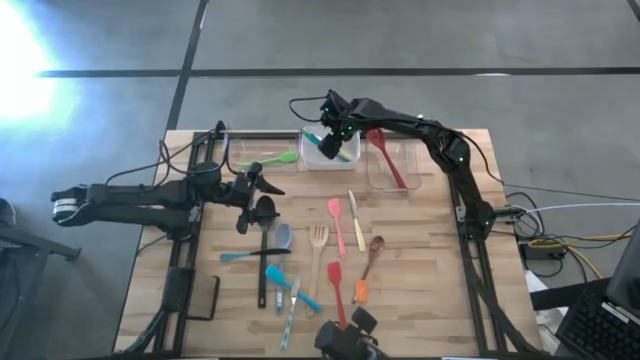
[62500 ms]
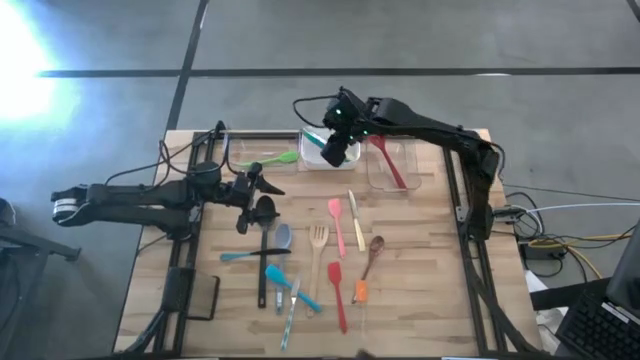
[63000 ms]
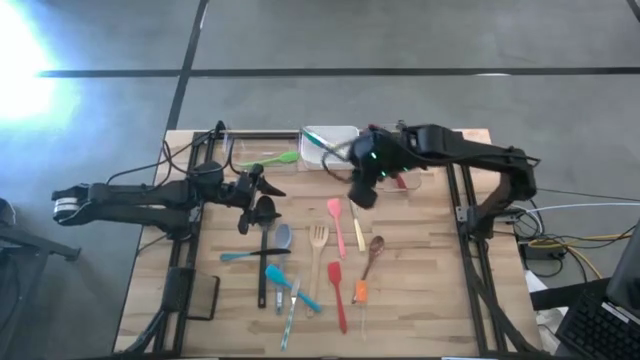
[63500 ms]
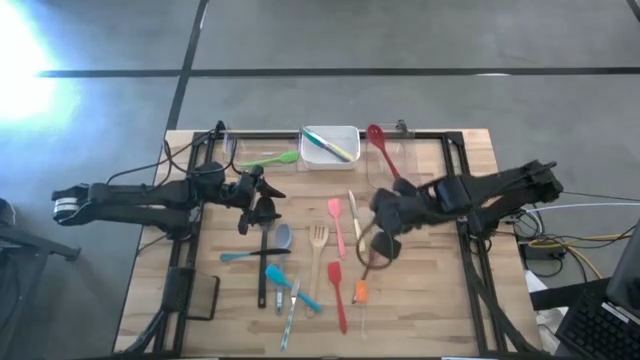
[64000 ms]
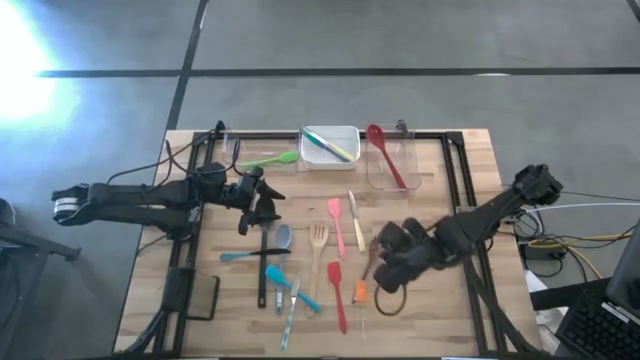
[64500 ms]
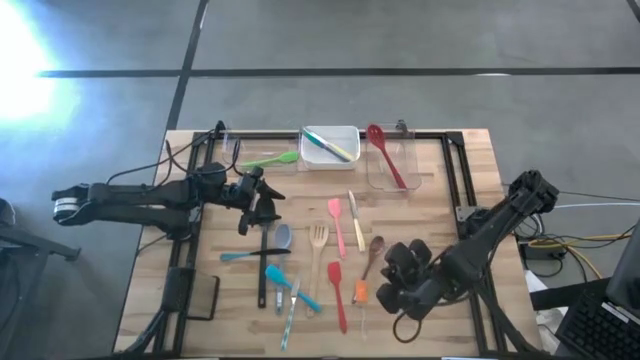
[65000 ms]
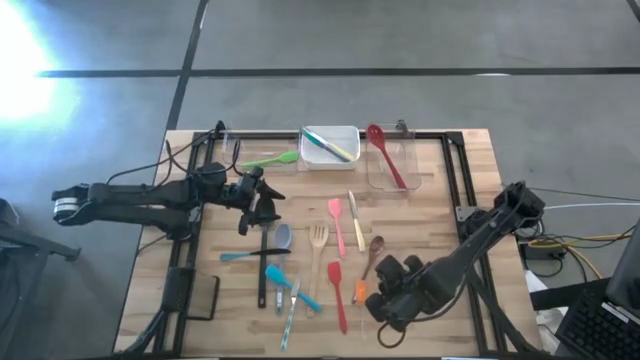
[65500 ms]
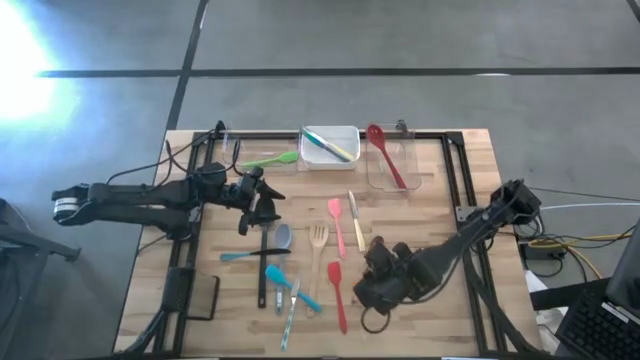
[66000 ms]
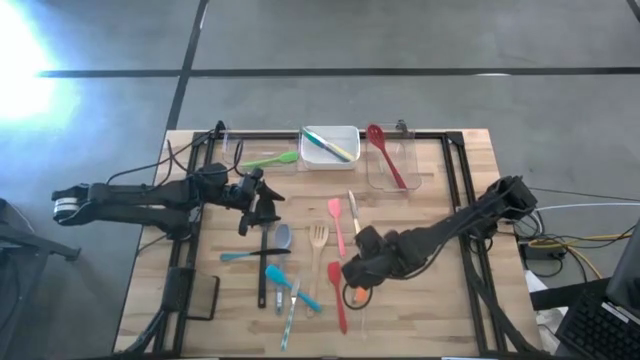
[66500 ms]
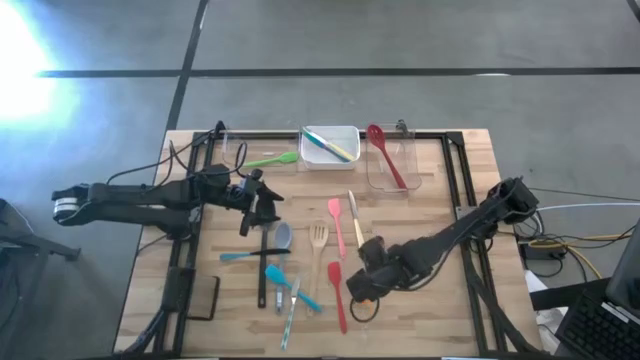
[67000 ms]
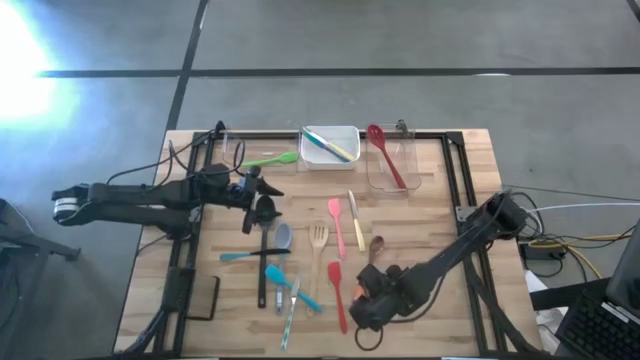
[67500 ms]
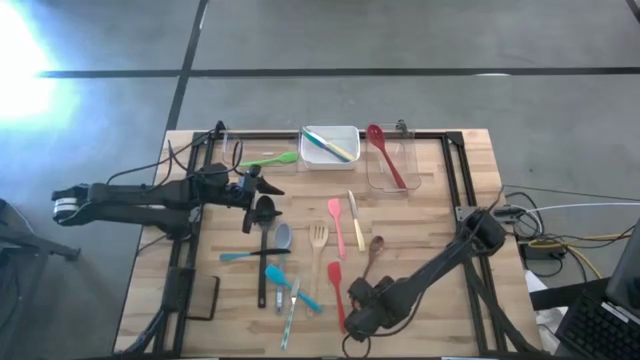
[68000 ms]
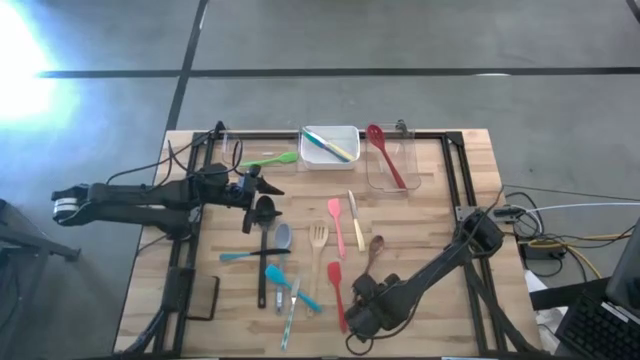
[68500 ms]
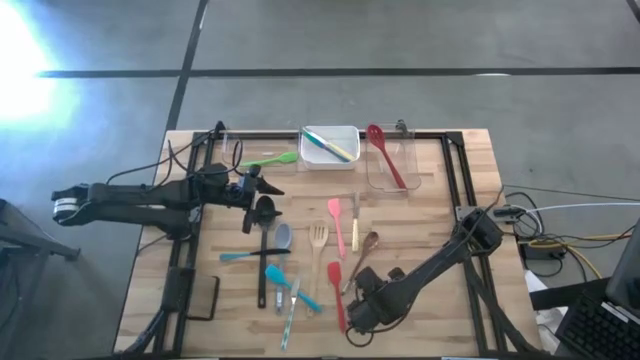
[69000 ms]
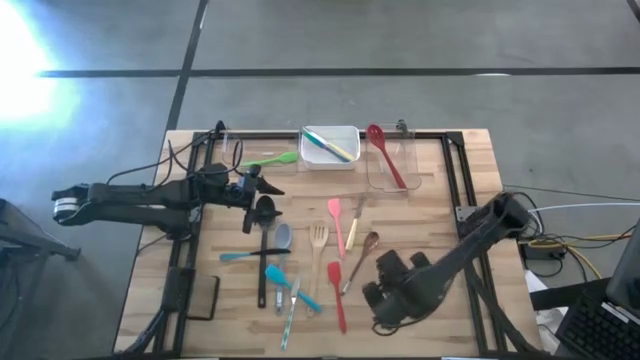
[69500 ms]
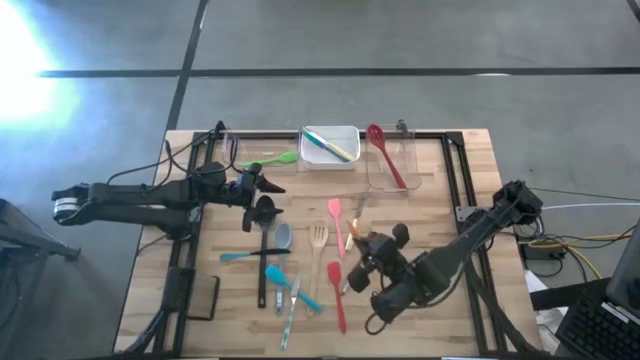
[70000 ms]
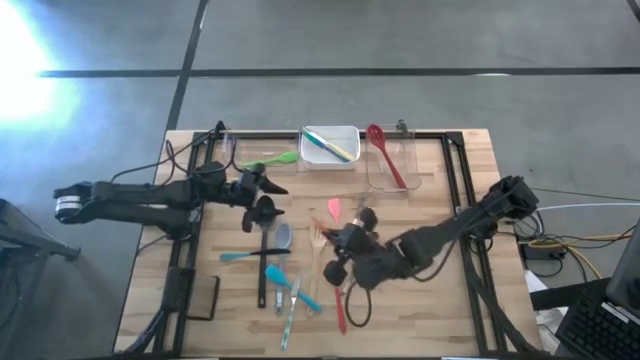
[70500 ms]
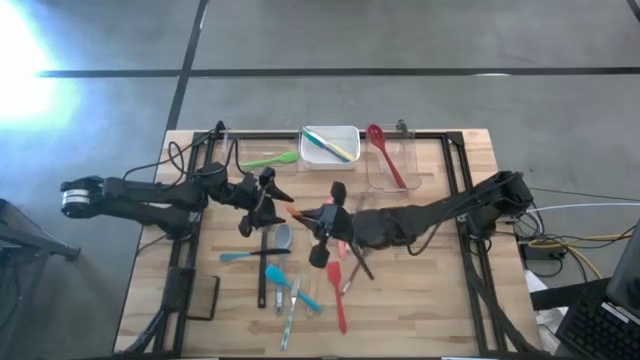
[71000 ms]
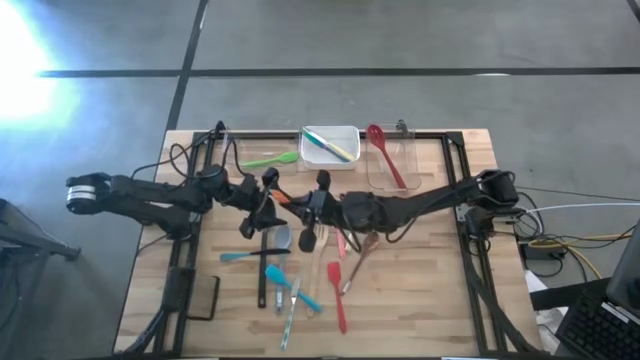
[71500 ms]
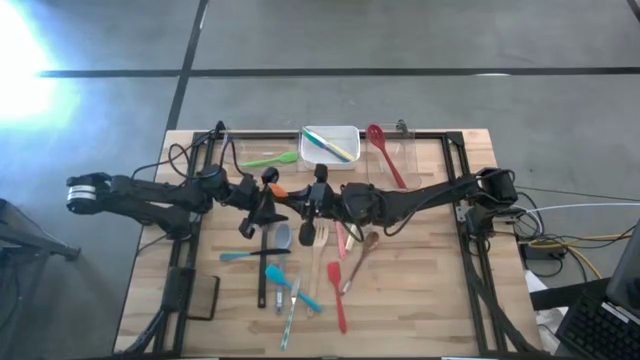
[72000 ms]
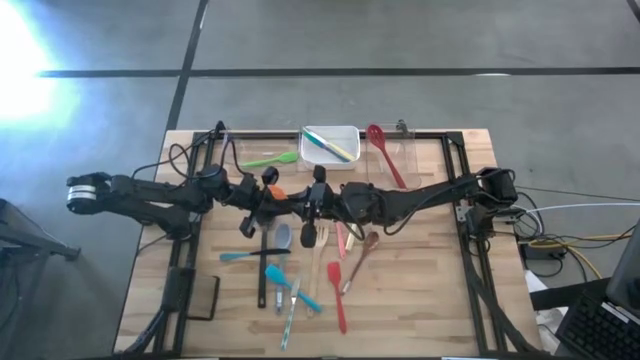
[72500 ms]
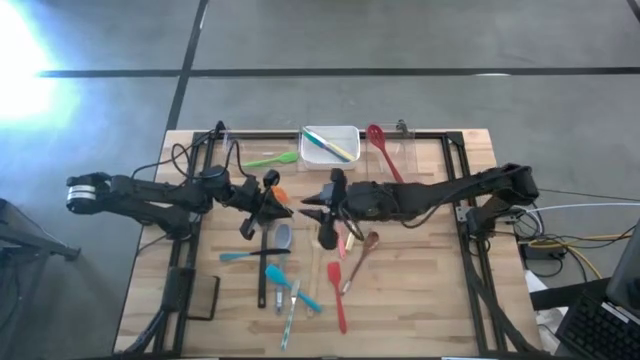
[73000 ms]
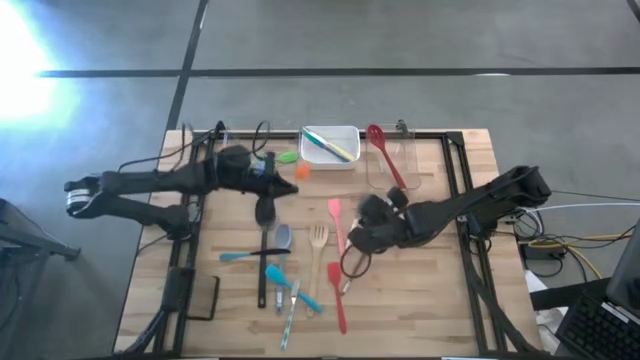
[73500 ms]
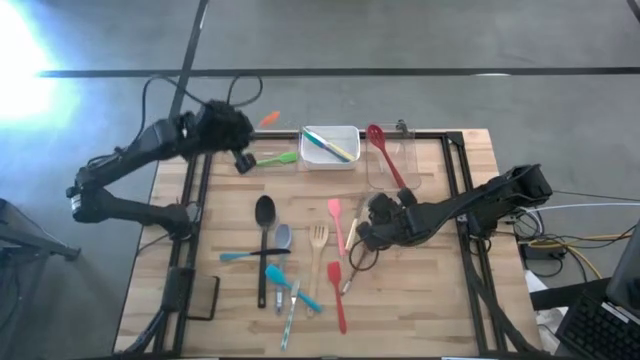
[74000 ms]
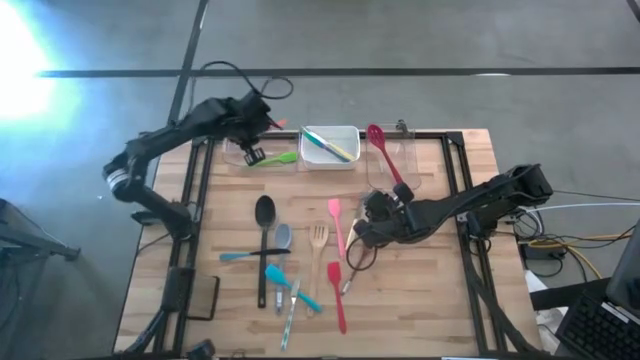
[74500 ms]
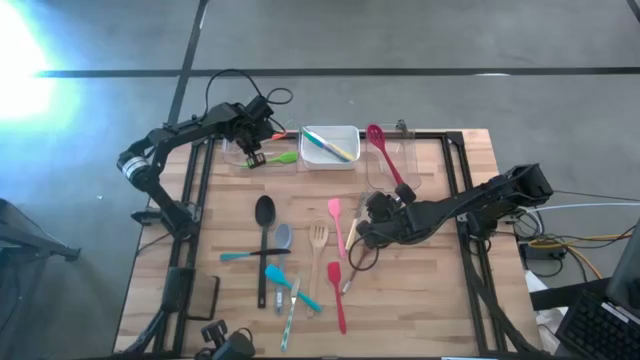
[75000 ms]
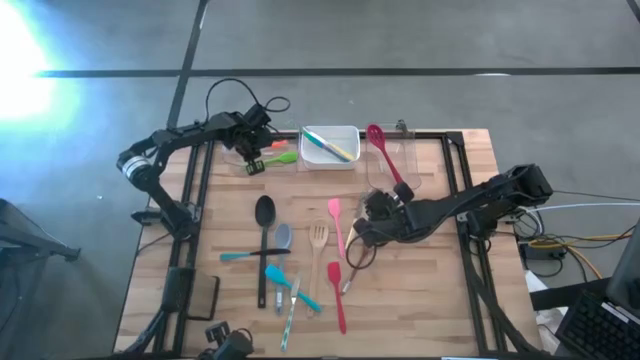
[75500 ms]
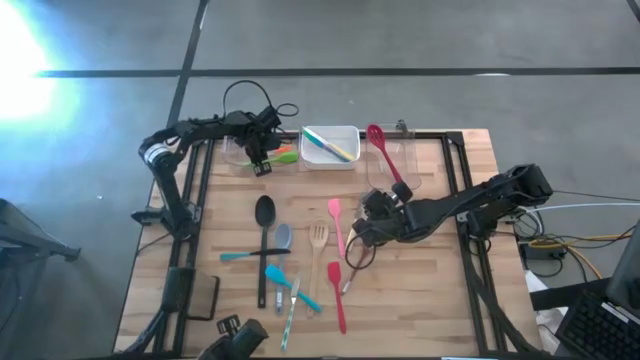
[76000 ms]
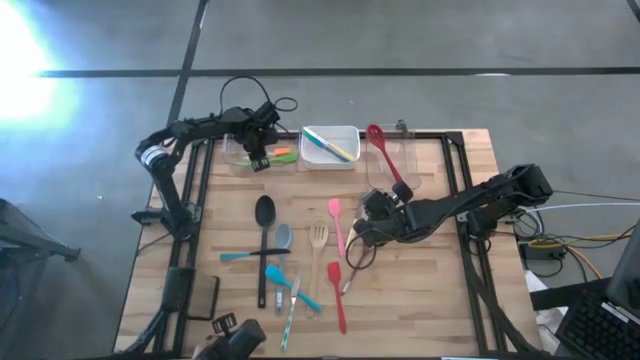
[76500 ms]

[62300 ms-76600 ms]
Task: Pick & Place Kitchen Items
Put the orange spatula into the left transparent bin

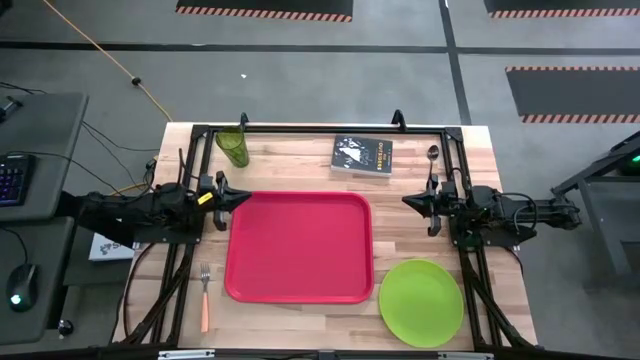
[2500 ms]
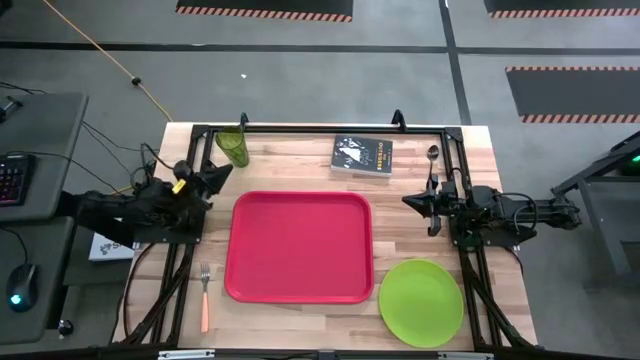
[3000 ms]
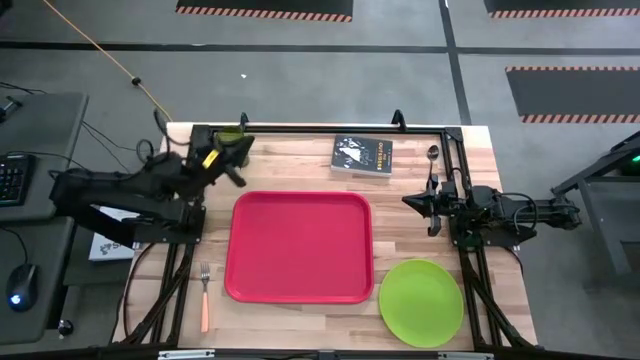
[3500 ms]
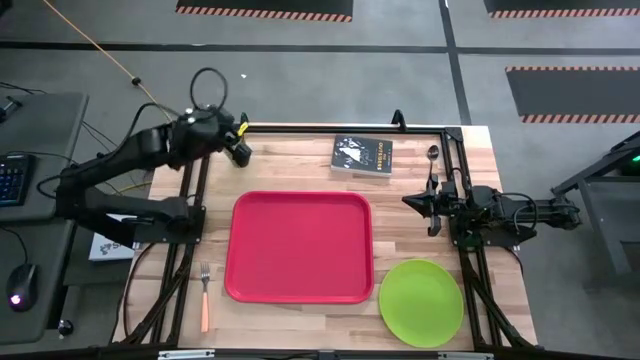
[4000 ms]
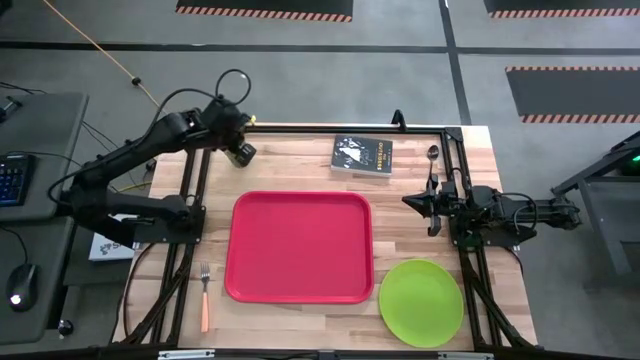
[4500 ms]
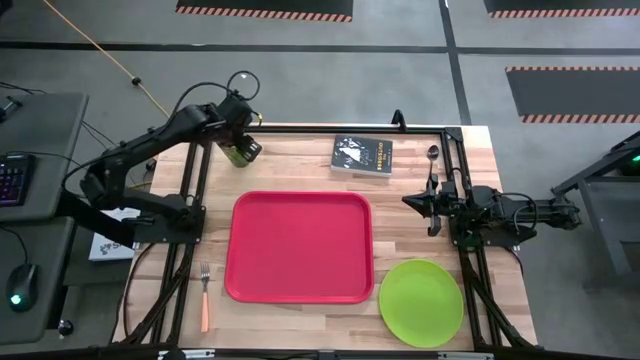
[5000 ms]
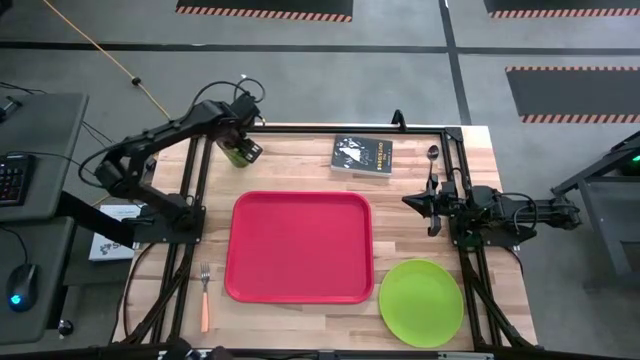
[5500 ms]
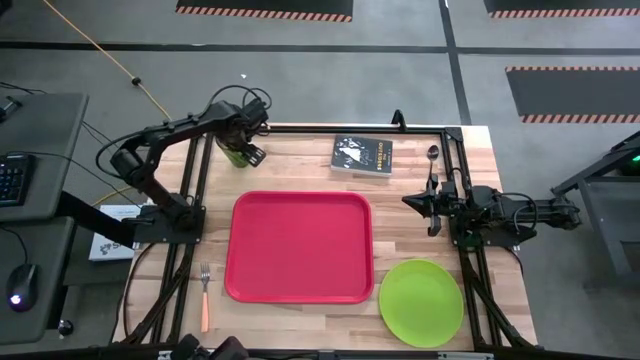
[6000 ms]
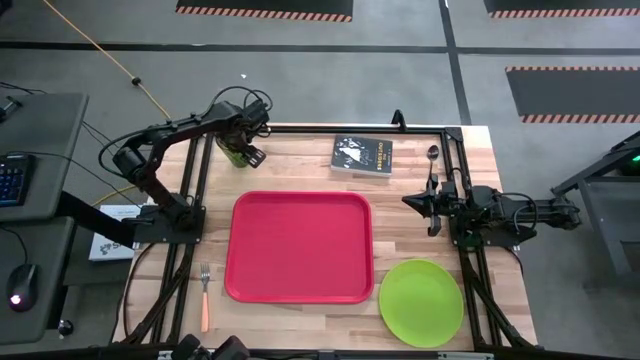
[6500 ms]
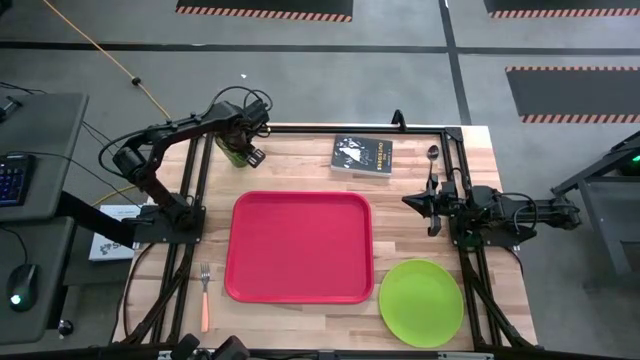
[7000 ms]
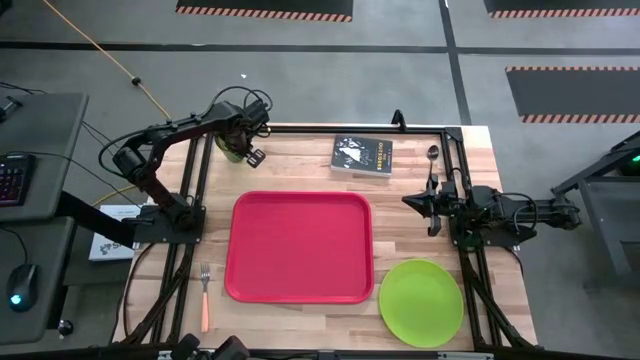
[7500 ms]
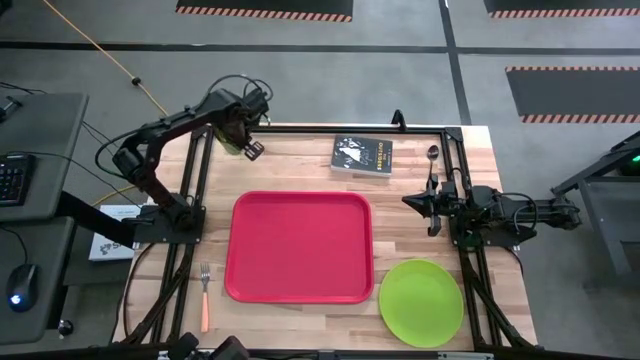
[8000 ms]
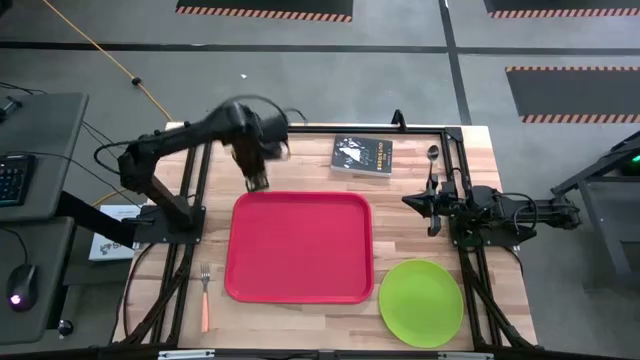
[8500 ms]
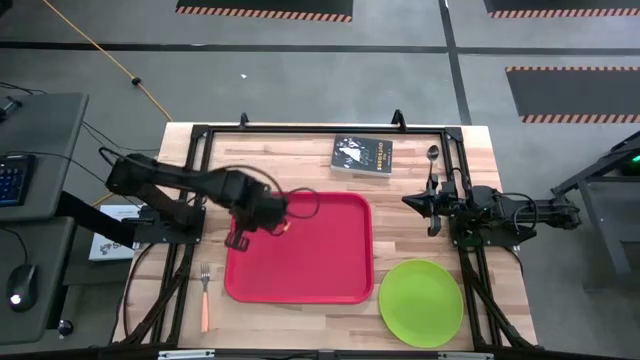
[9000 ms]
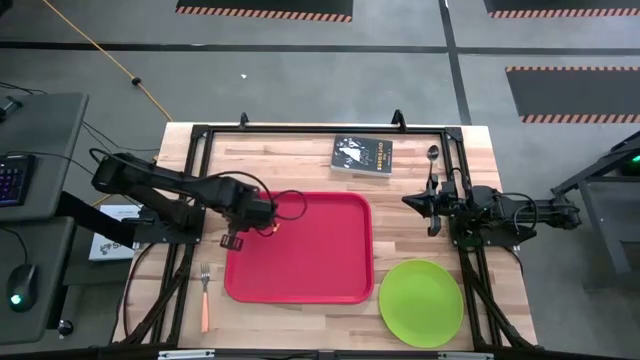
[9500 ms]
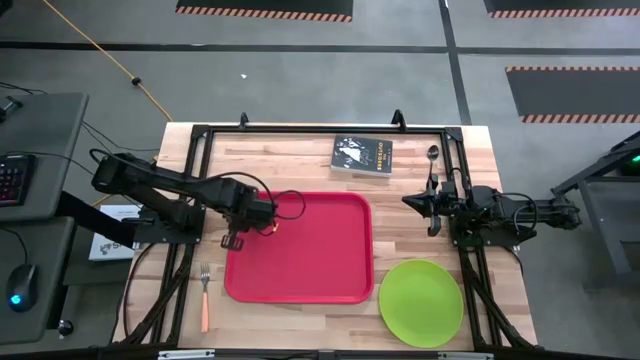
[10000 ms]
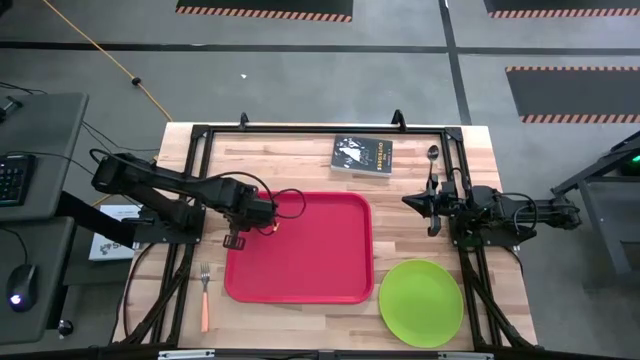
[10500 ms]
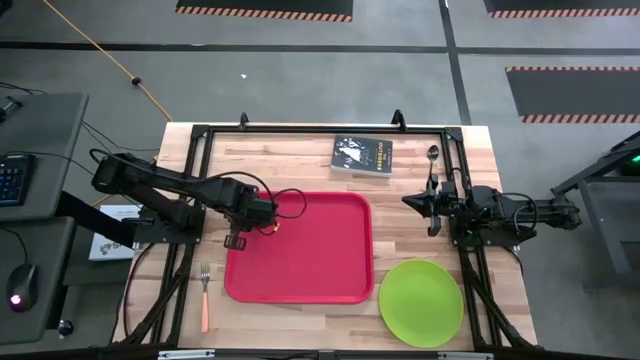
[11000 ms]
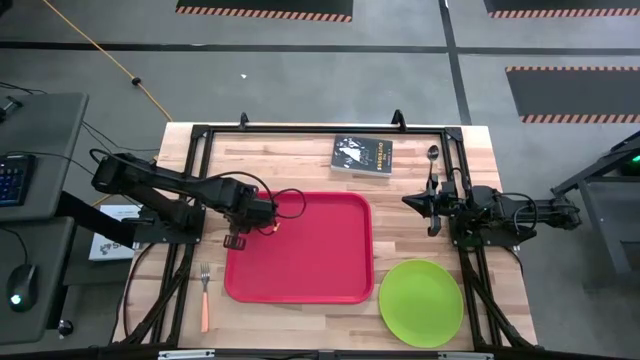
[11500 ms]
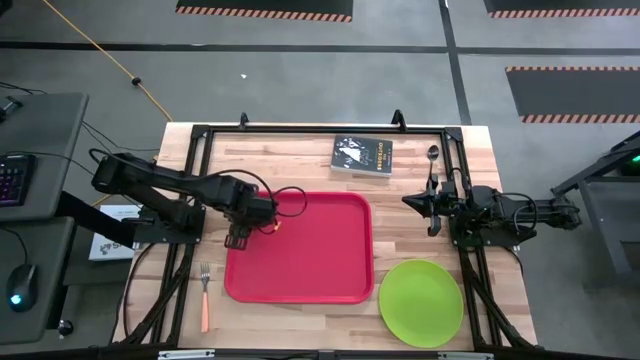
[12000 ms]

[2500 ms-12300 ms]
Task: Pick and place plate/cup/fork/spoon on tray
Put the green cup on the top left of the red tray
